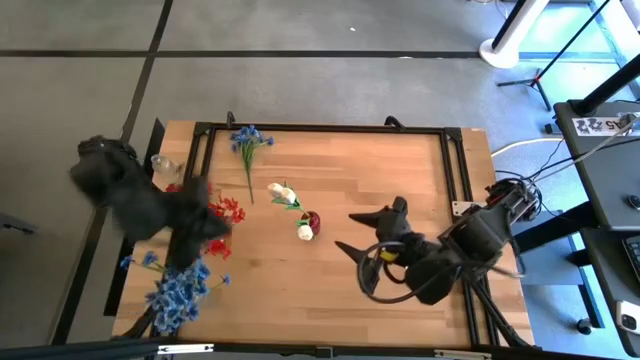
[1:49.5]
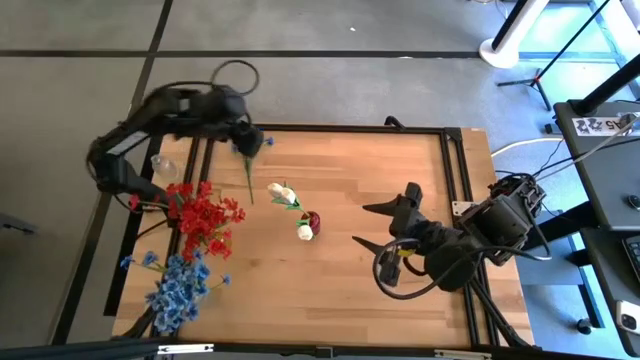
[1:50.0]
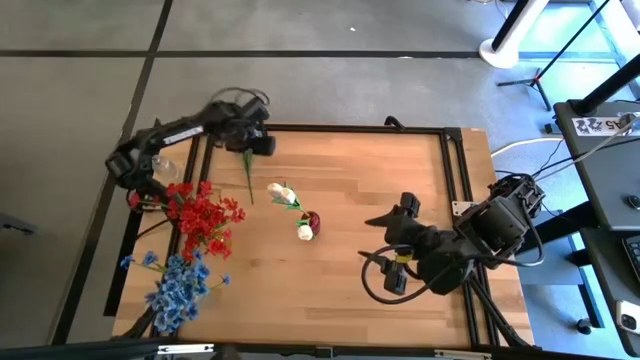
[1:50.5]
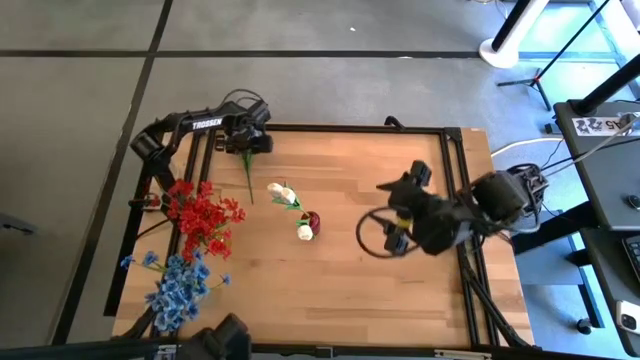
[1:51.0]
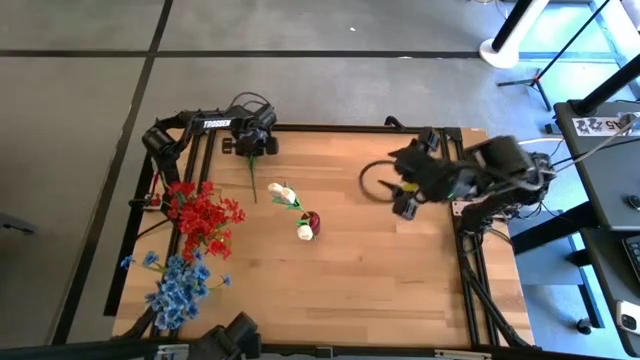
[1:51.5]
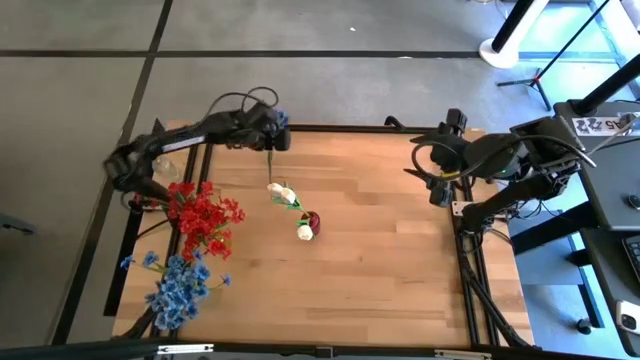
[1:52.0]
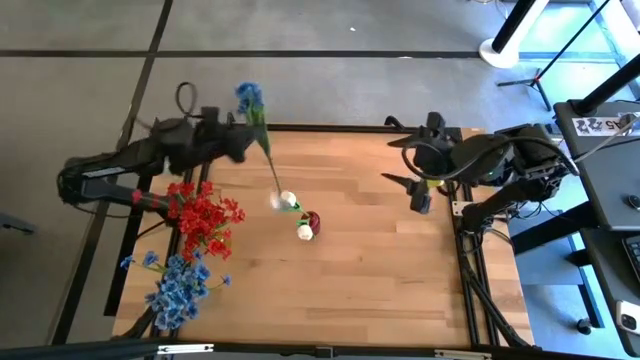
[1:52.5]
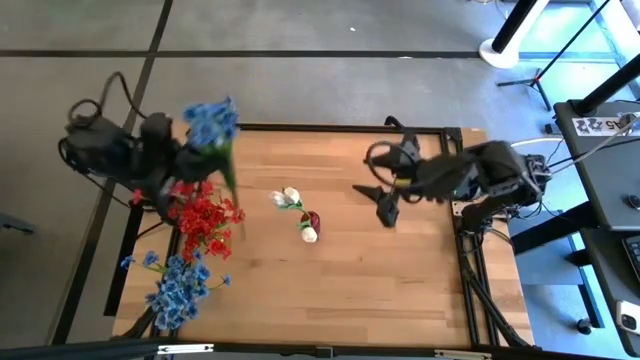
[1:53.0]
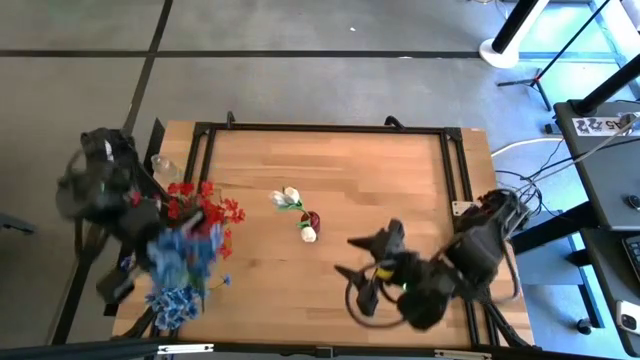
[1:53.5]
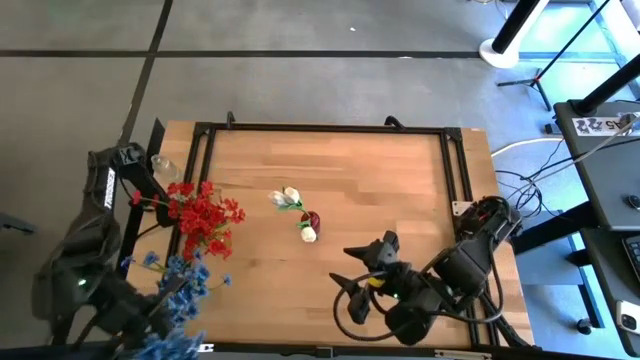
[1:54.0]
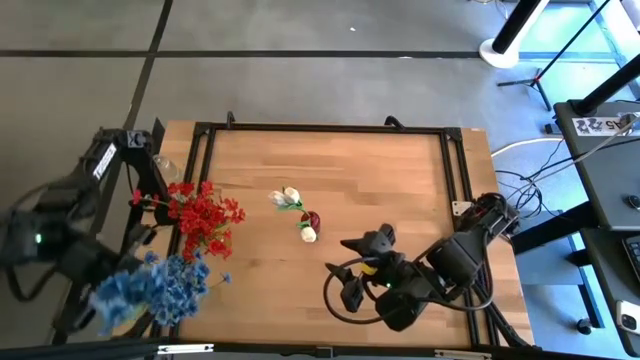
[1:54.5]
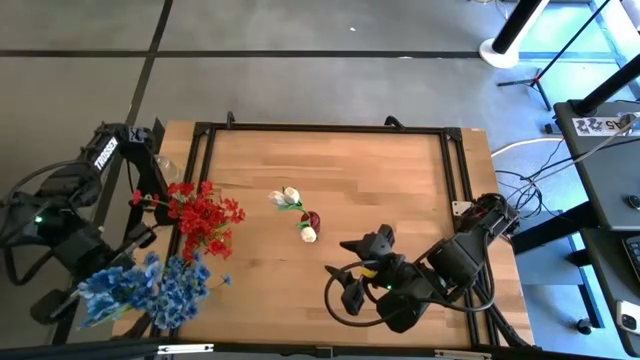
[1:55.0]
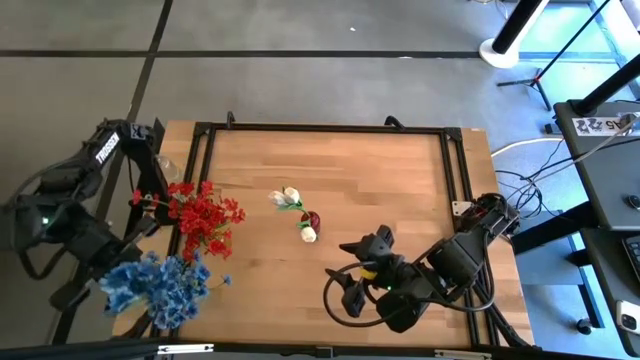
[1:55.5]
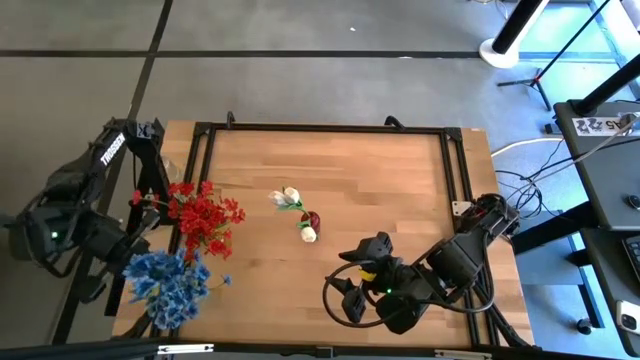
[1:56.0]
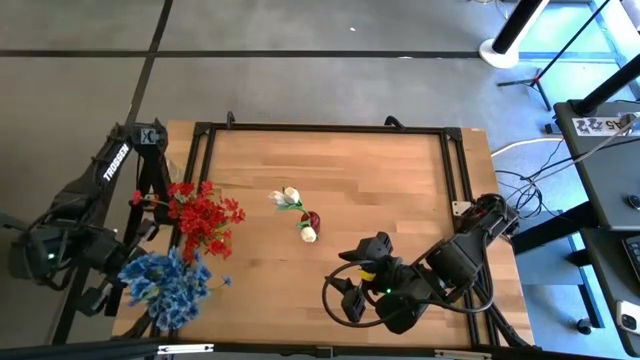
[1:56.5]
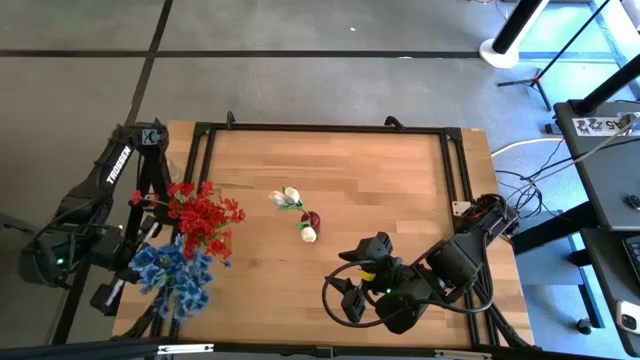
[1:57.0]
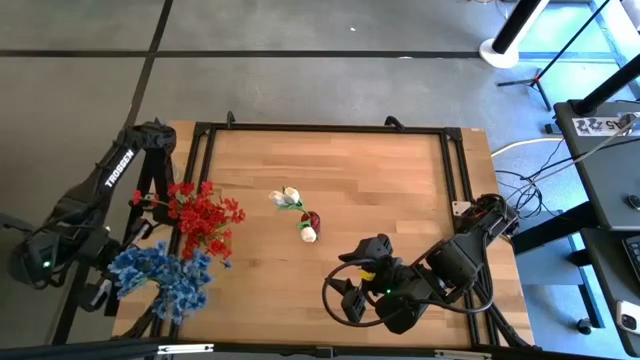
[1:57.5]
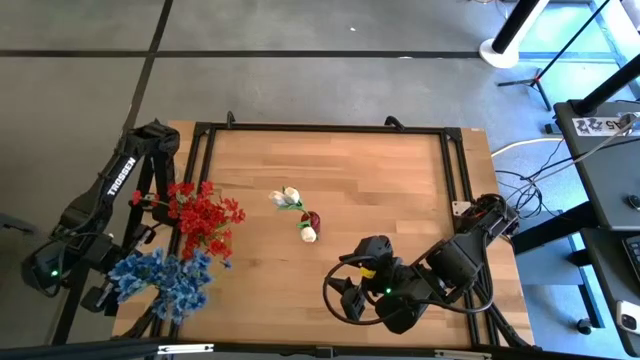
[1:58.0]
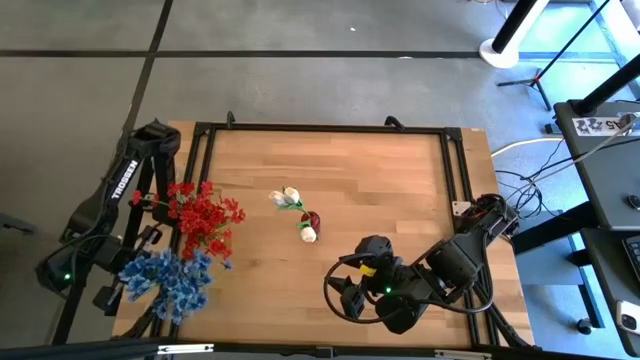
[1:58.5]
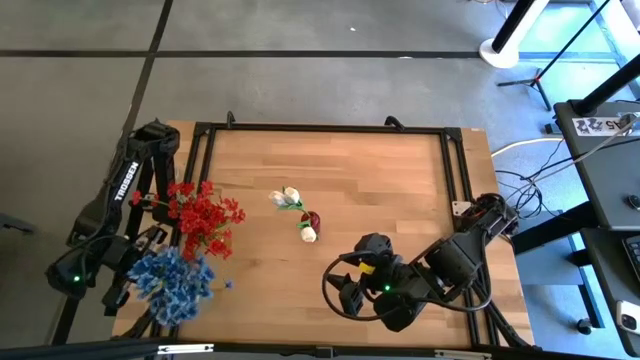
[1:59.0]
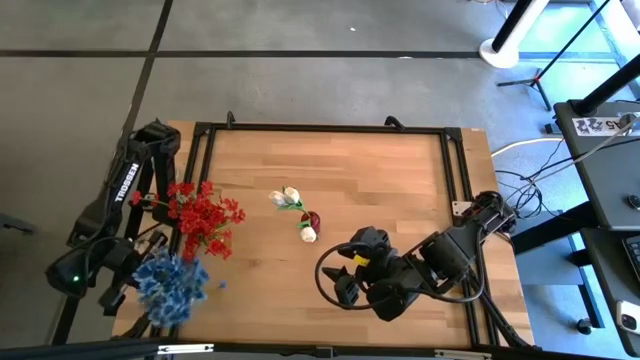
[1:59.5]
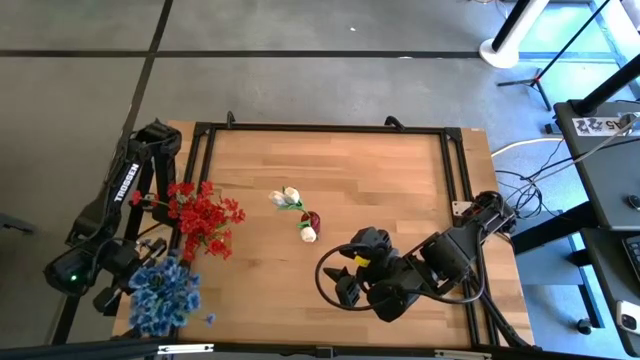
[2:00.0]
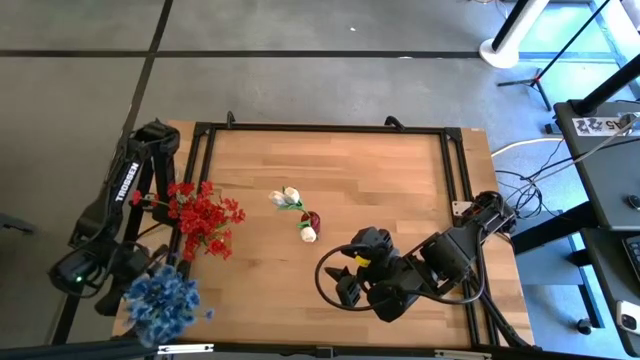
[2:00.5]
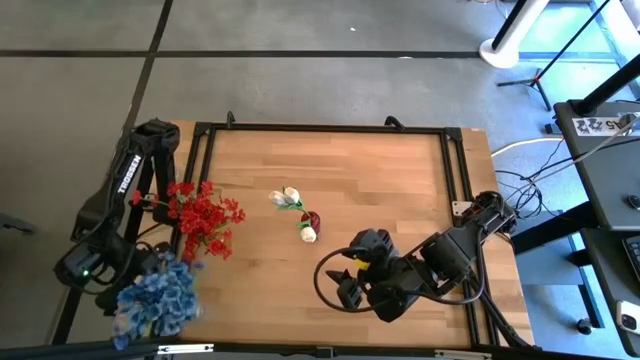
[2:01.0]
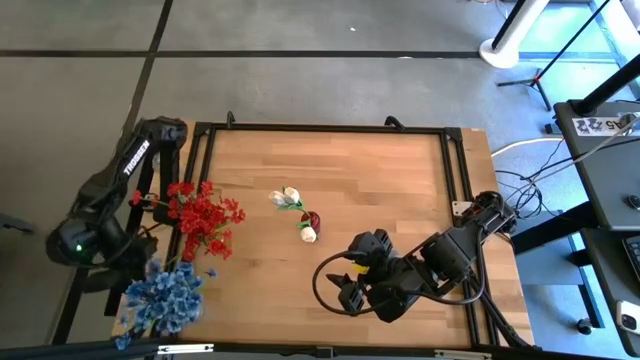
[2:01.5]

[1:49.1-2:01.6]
Task: Sort flowers into vase by color
Put the blue flowers into the transparent vase

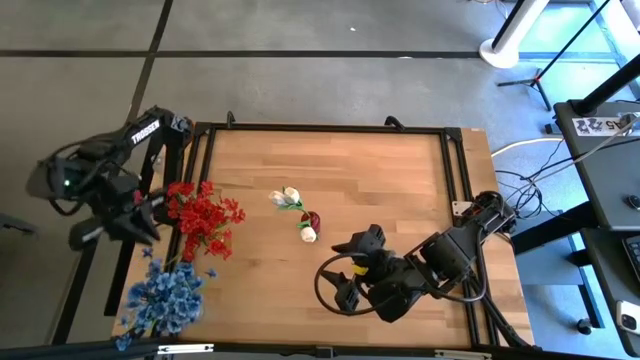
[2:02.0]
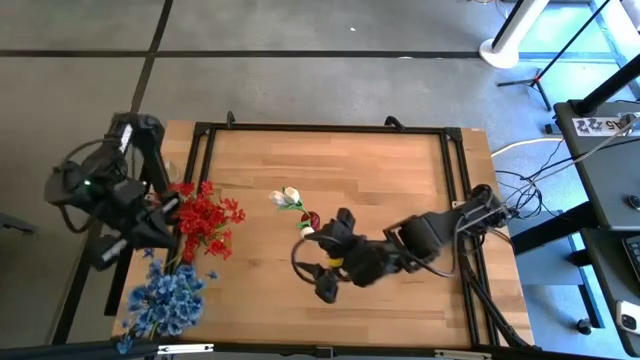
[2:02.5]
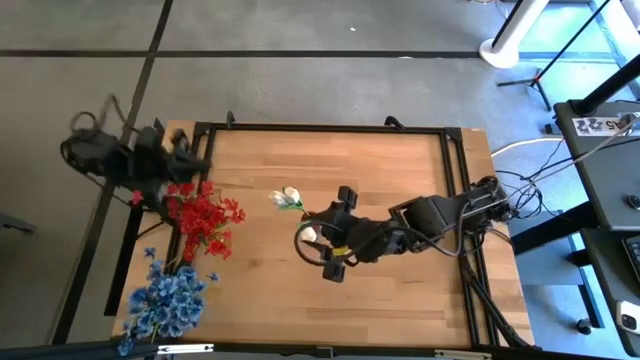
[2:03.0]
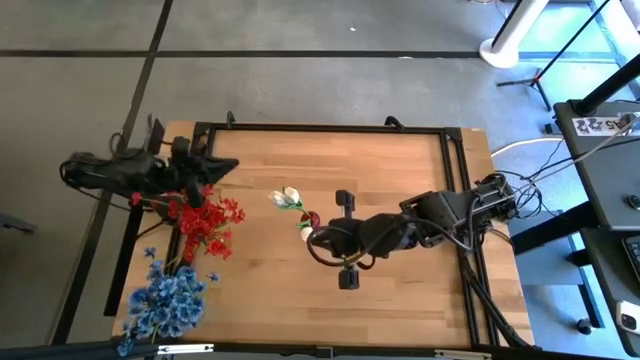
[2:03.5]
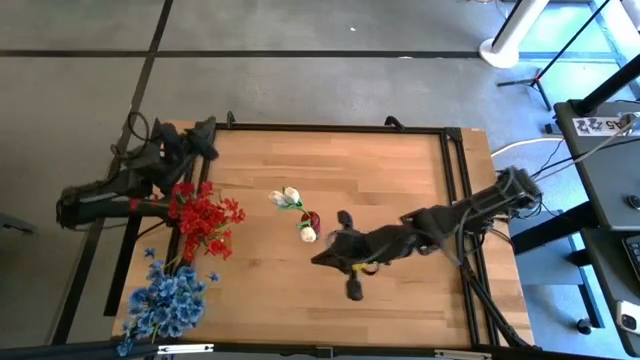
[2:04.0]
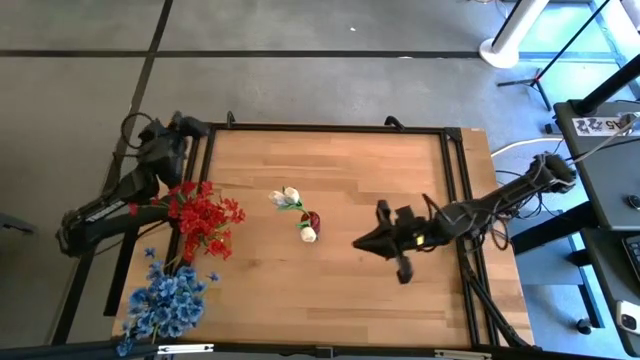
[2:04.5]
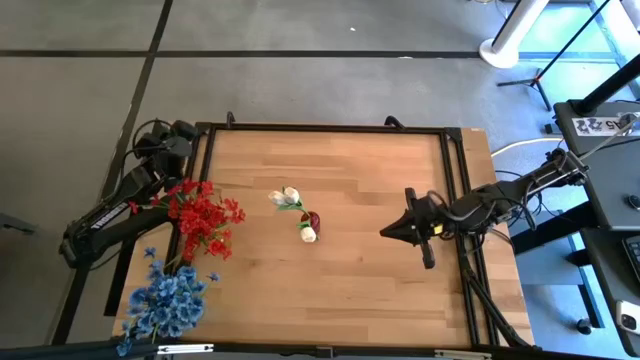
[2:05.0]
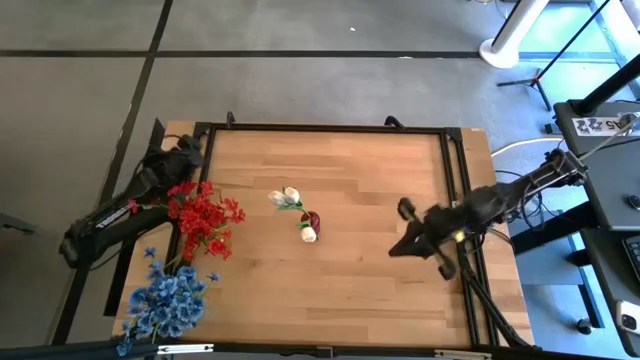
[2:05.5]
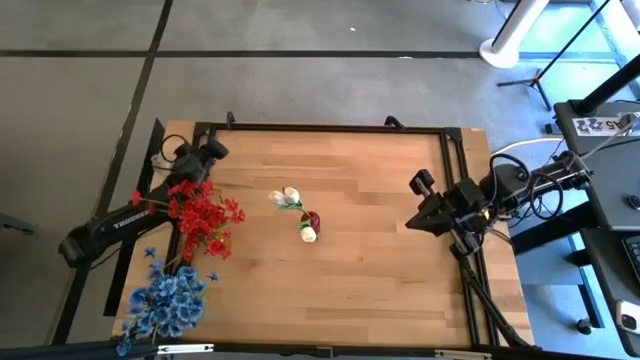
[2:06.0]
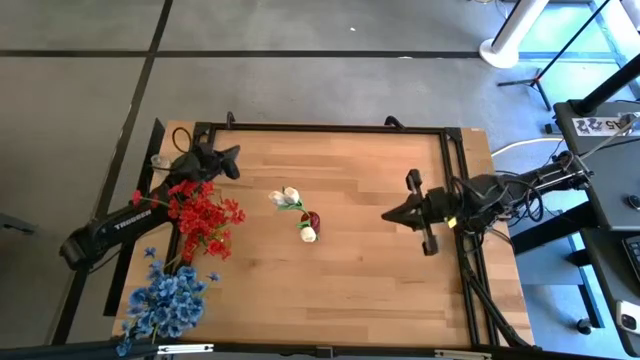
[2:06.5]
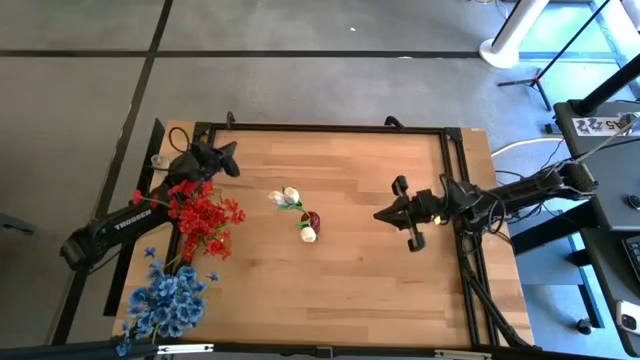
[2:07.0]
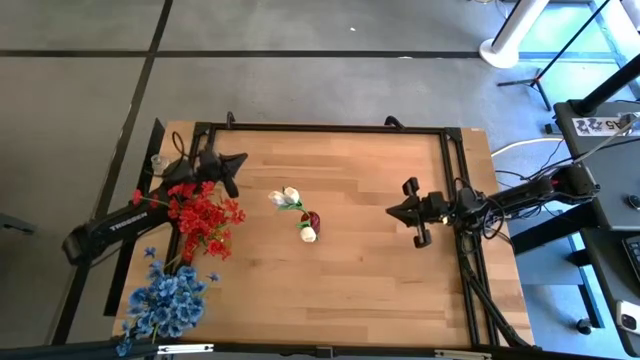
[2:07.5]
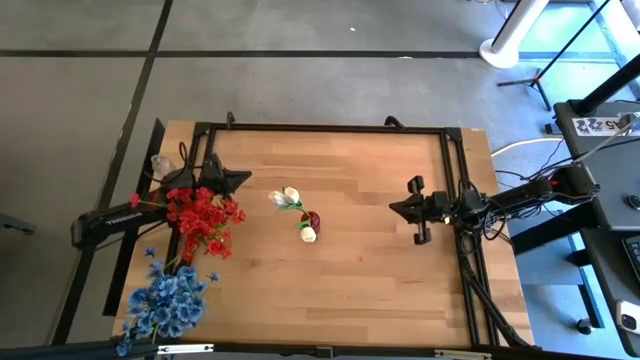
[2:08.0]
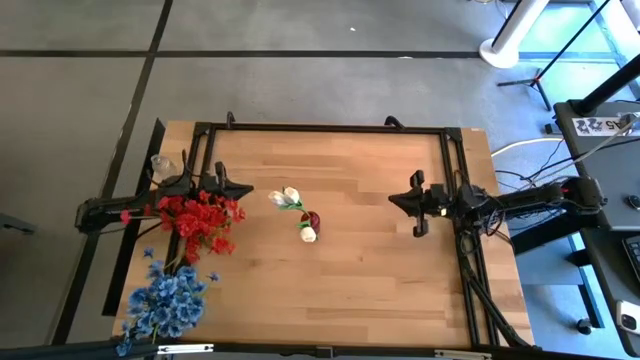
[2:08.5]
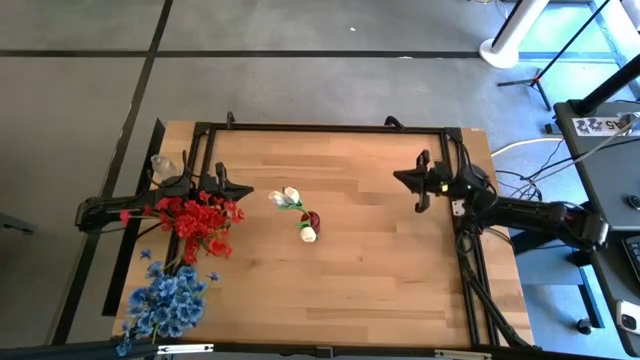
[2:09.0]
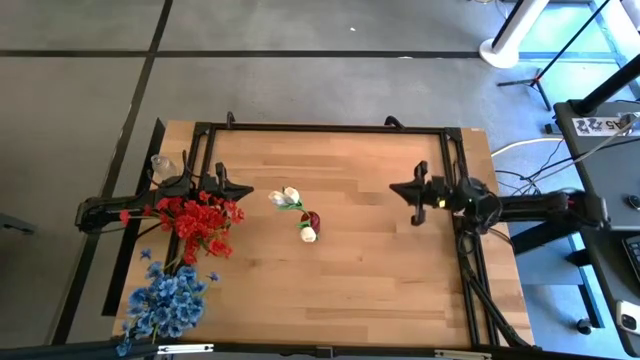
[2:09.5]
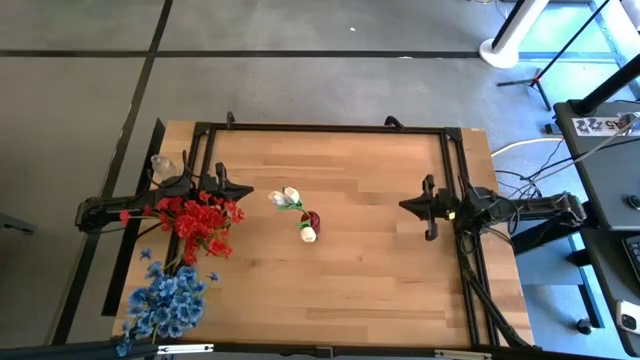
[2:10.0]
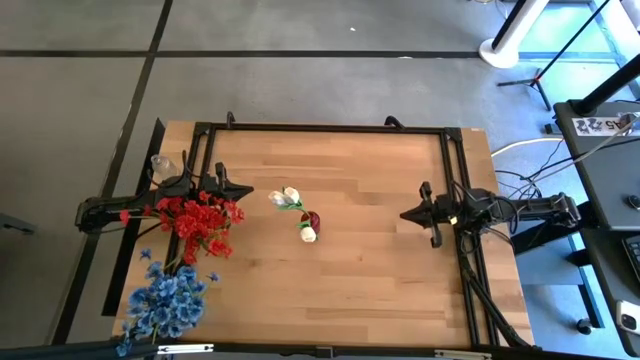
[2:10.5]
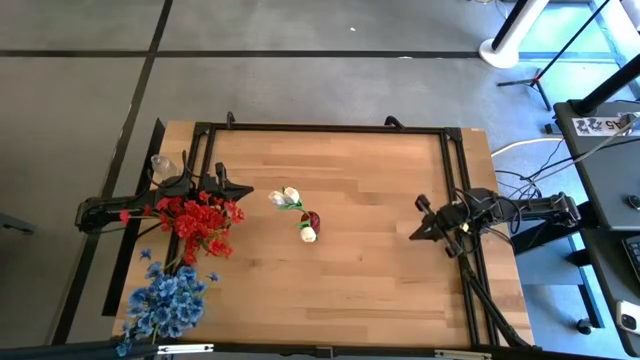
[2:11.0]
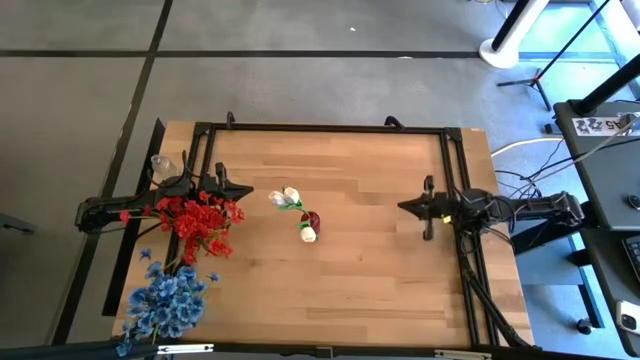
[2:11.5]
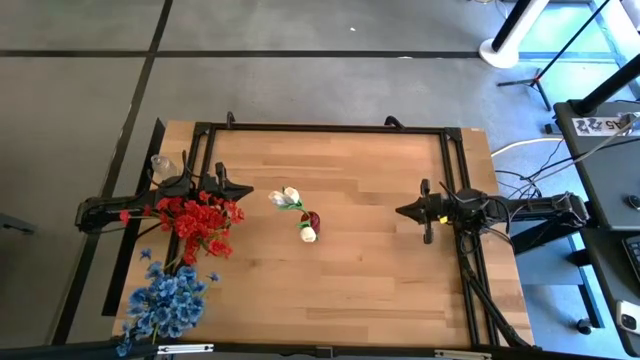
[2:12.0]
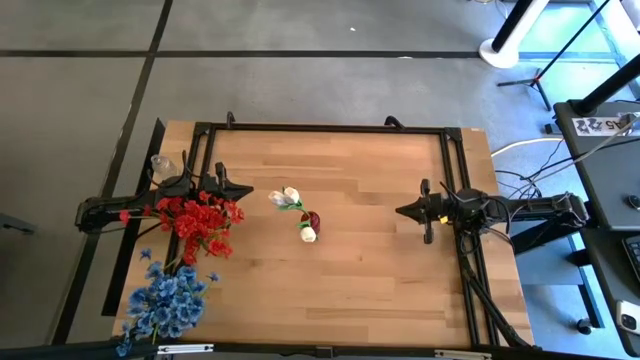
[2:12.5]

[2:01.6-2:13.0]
Return to Home Position
